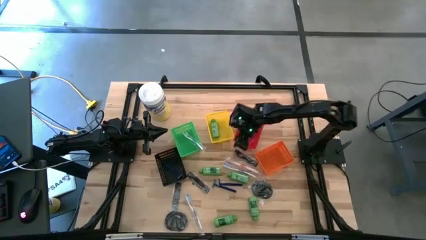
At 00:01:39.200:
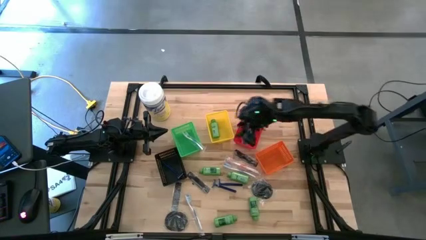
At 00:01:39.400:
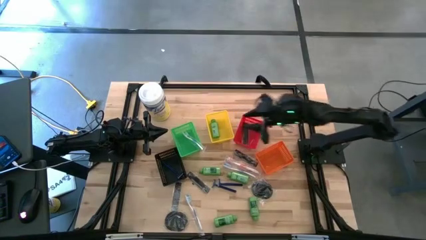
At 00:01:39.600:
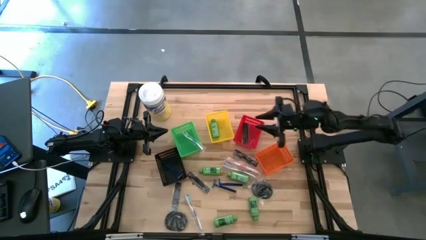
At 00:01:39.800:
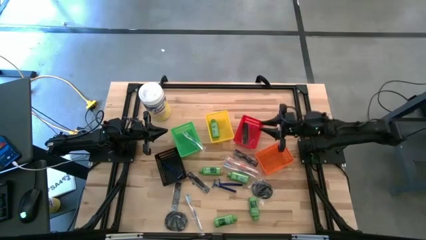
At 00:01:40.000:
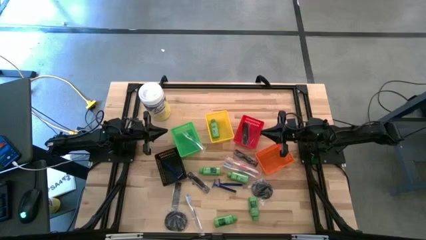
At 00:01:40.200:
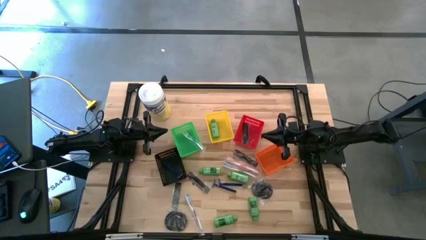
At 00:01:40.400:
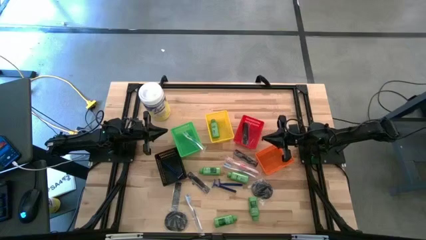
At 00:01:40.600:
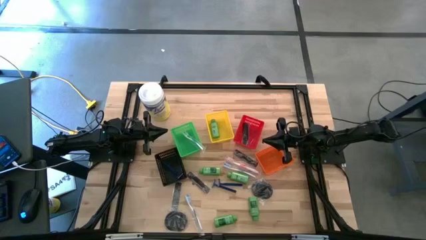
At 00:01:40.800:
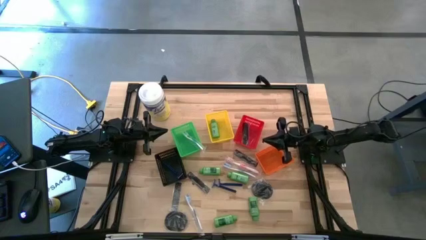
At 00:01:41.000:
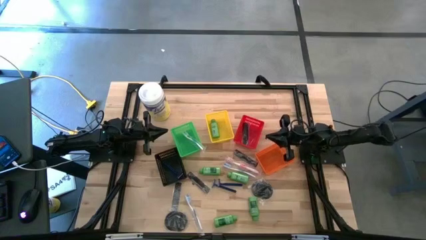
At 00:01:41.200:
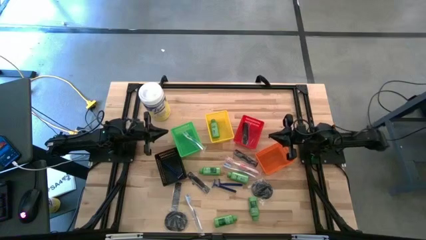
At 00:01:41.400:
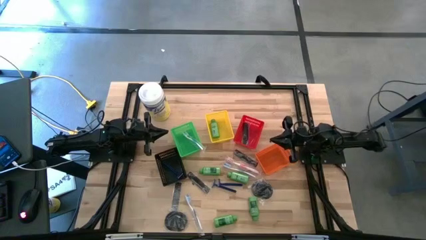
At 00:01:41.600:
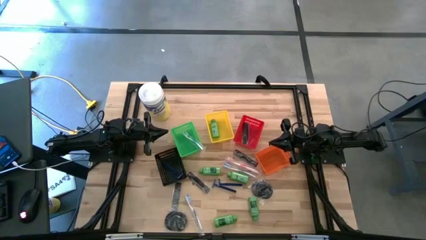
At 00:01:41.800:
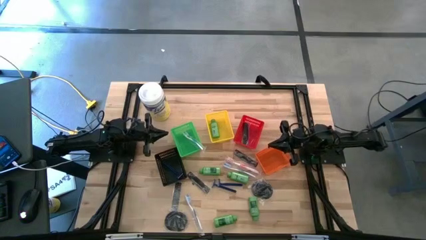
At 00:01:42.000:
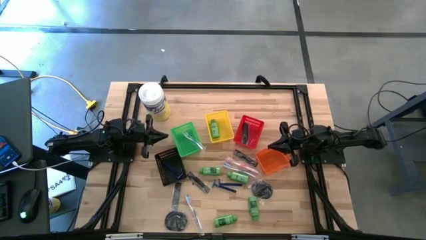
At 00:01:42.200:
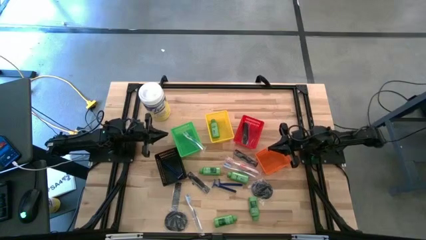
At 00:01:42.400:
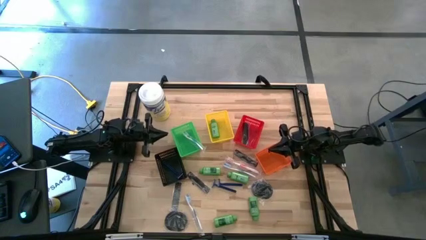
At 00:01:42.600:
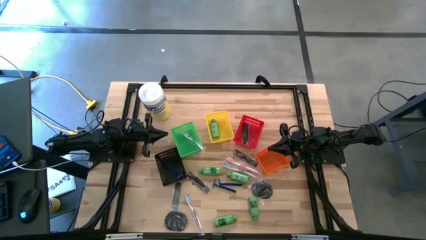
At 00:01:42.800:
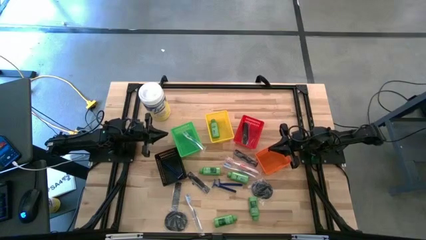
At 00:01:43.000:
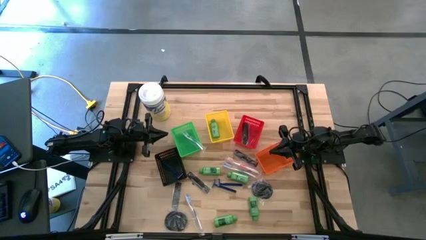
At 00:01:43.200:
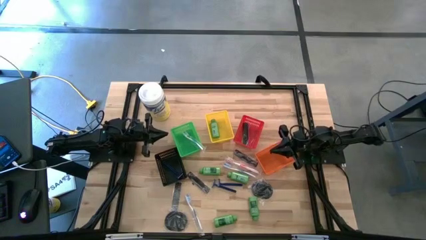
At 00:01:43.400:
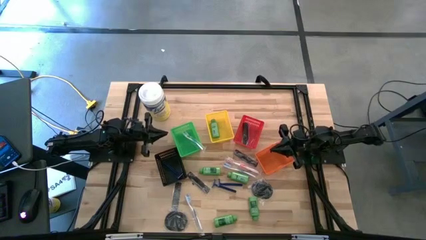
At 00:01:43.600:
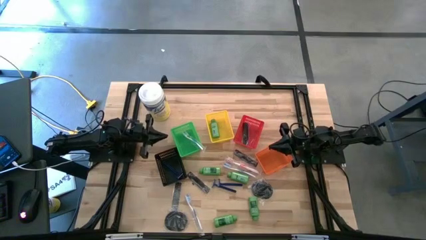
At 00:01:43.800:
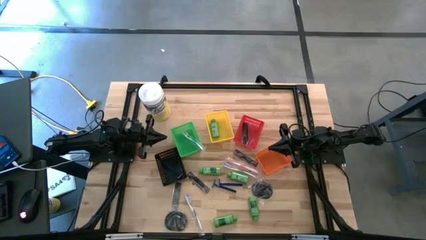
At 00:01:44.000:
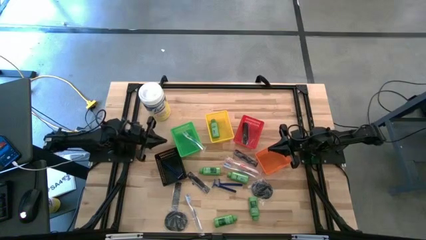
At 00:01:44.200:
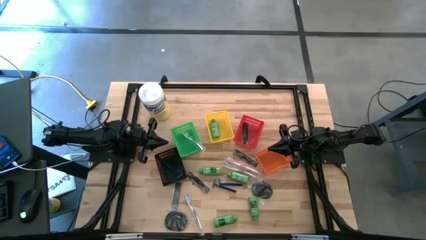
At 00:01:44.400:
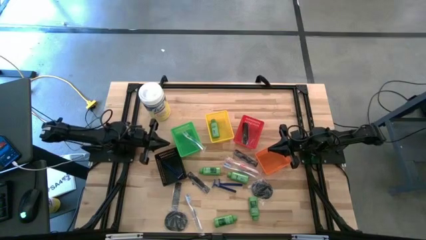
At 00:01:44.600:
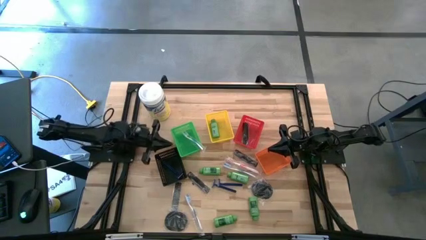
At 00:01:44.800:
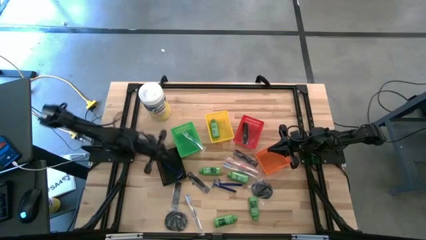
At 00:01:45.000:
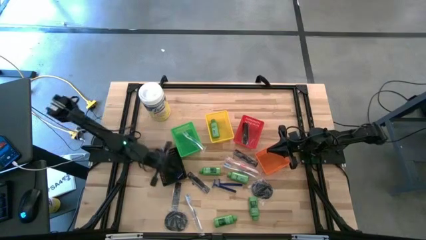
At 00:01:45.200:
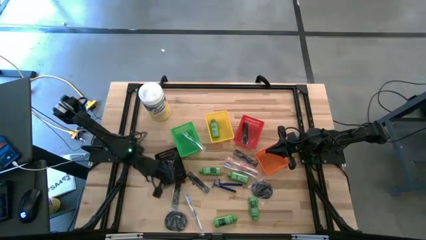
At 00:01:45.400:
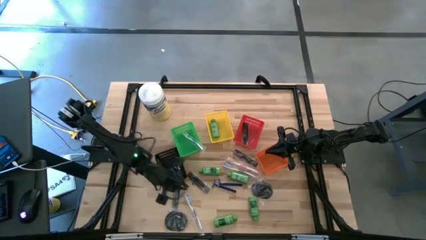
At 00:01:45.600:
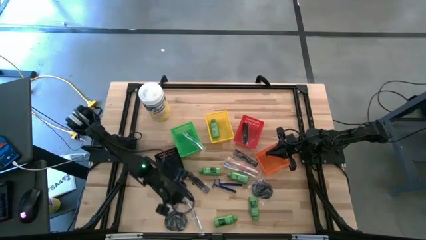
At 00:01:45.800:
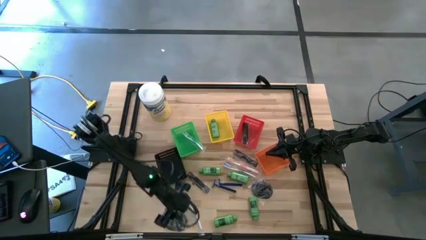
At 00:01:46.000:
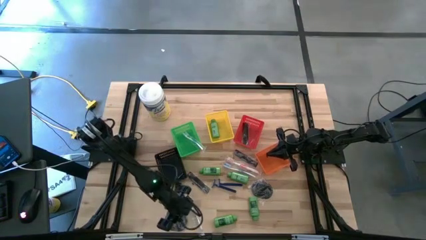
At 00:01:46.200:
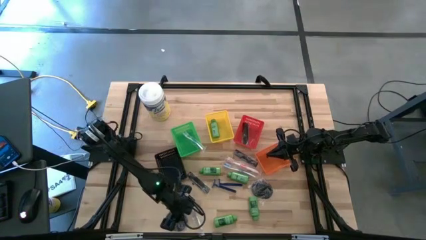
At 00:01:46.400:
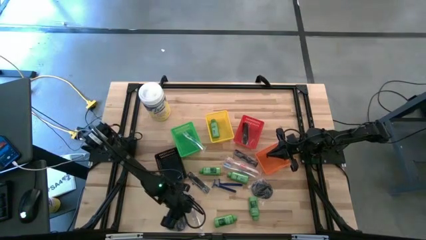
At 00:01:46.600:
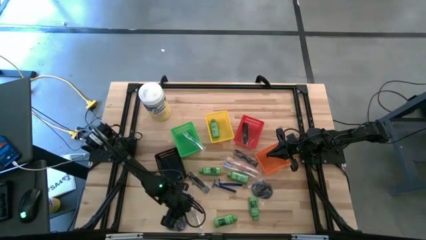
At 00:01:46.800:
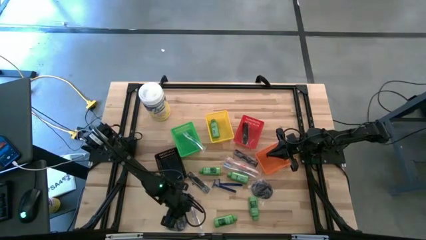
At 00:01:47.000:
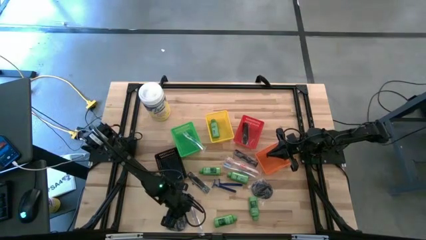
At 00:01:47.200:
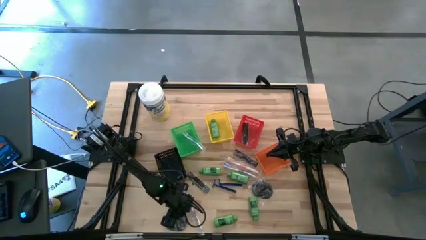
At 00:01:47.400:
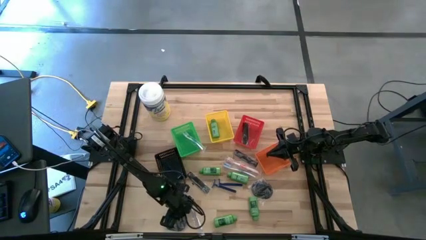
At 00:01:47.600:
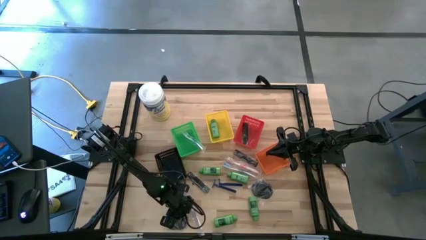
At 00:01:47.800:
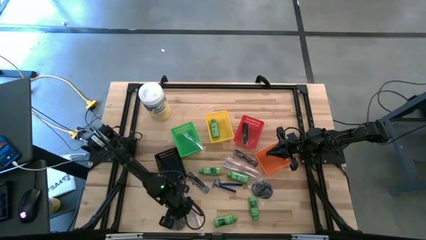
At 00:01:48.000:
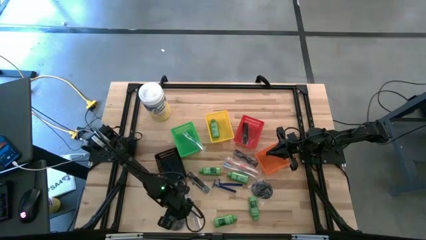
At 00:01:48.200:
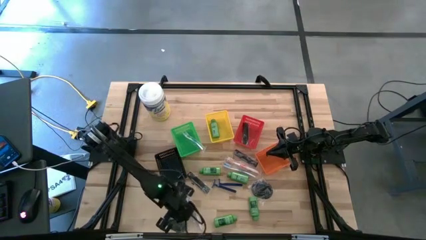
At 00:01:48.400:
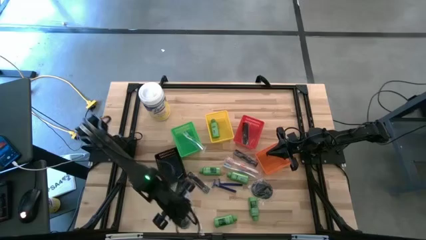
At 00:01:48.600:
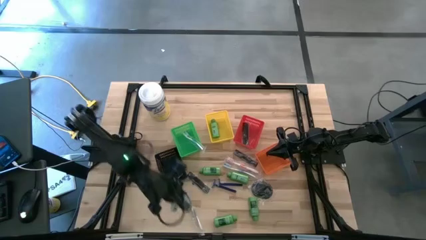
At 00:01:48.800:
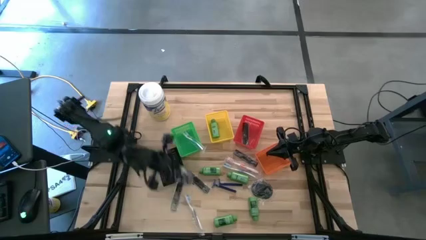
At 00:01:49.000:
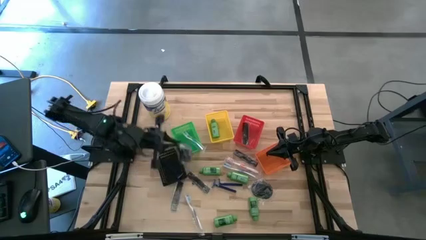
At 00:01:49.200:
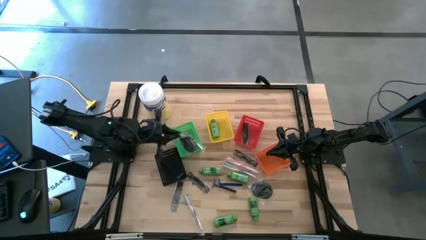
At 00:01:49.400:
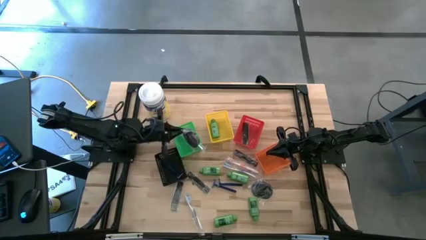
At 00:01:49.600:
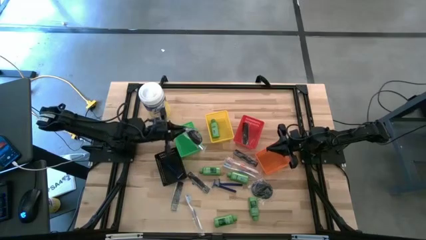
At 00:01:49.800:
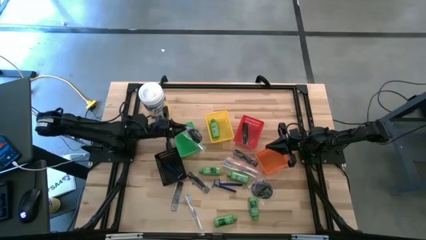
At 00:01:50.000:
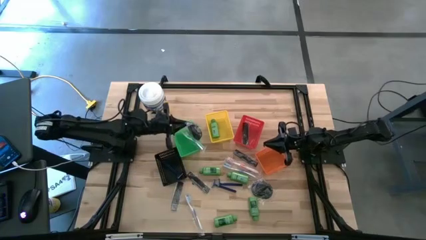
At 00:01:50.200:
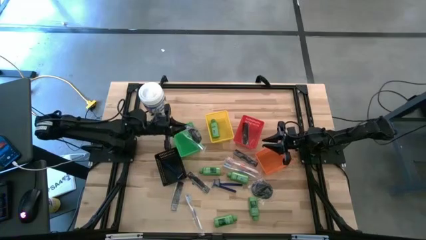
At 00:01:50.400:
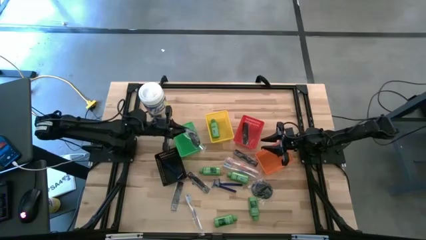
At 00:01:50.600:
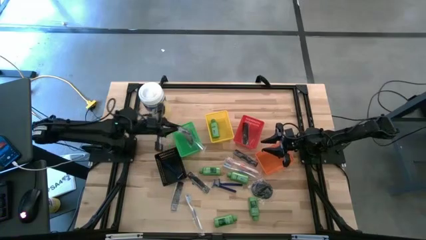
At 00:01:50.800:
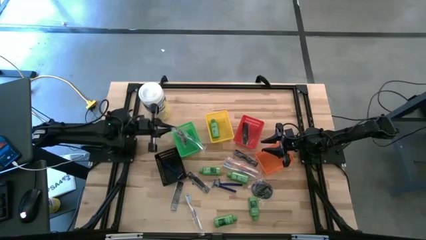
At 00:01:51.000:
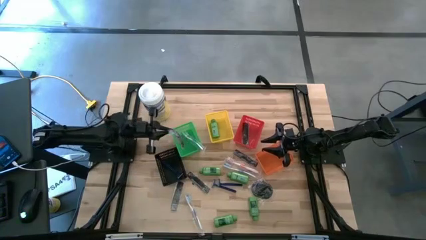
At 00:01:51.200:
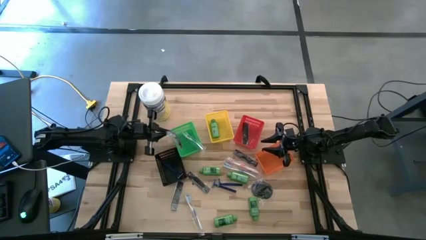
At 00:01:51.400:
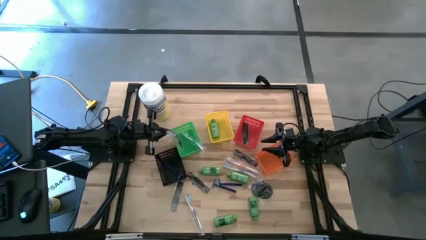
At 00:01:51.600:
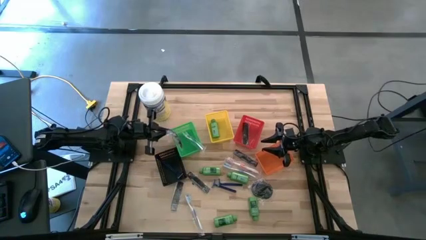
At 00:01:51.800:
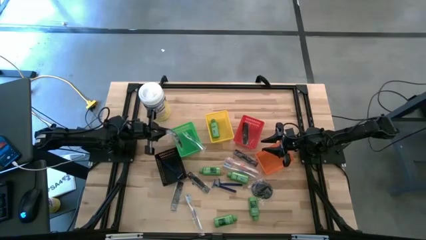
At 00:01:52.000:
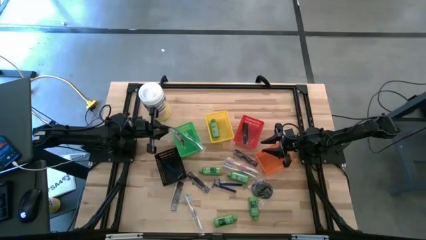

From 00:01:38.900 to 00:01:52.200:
Task: Pick & Place Travel size toiletries
Put the black hairbrush into the orange bin
